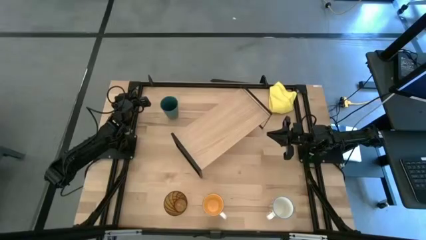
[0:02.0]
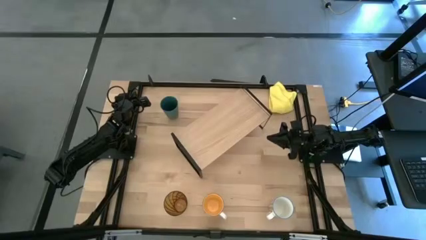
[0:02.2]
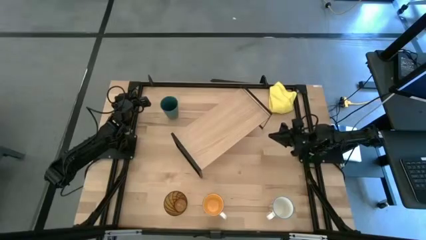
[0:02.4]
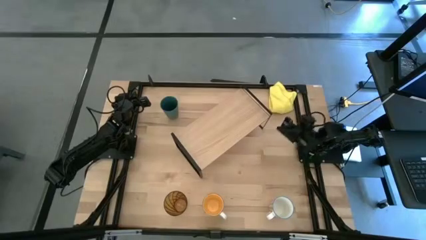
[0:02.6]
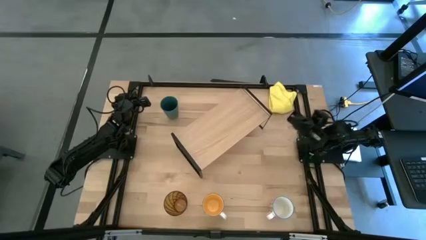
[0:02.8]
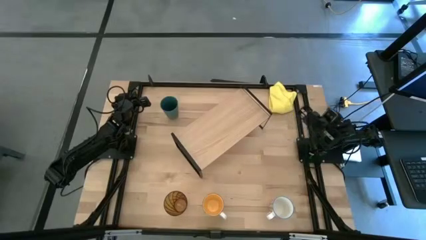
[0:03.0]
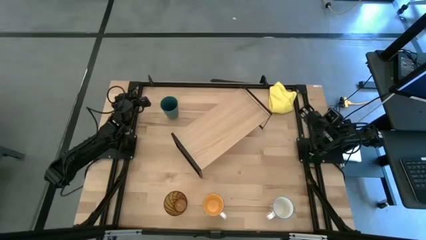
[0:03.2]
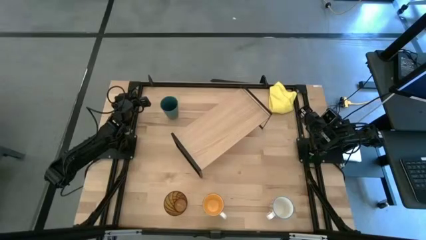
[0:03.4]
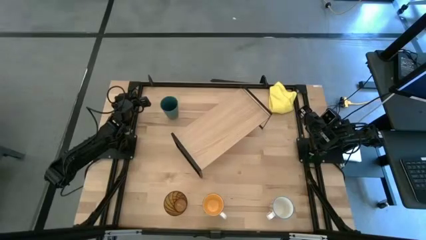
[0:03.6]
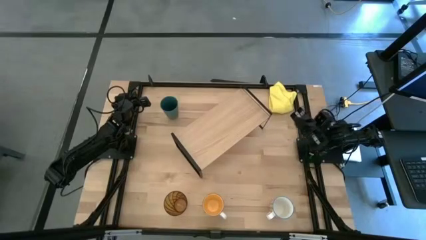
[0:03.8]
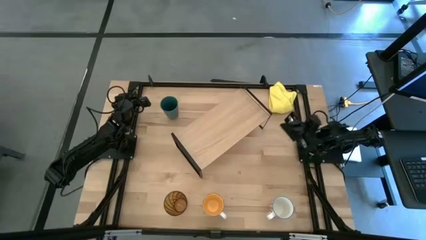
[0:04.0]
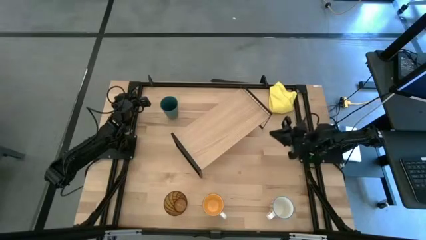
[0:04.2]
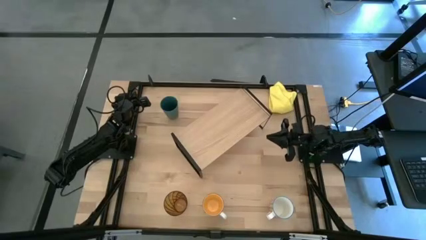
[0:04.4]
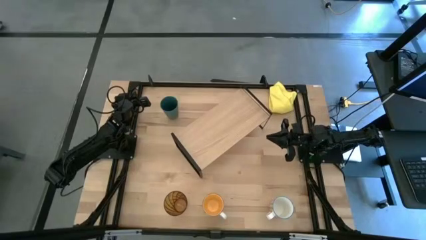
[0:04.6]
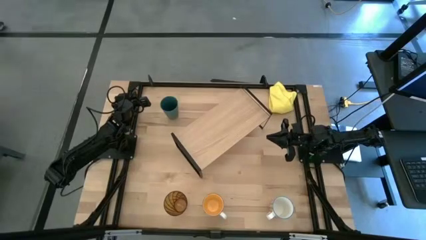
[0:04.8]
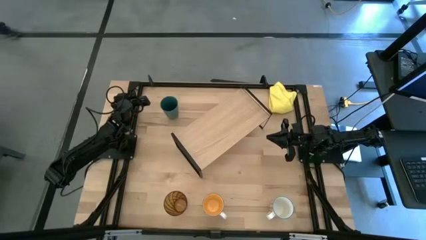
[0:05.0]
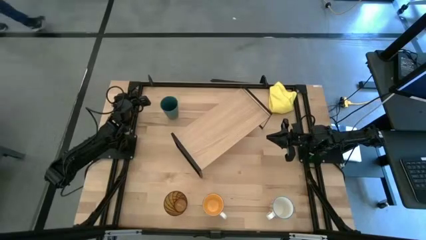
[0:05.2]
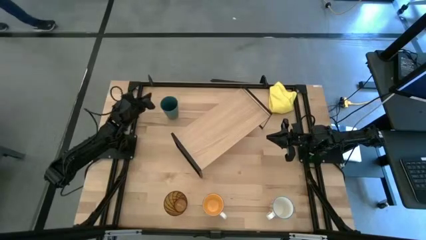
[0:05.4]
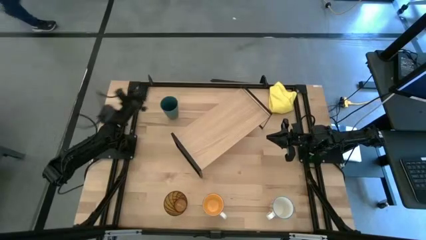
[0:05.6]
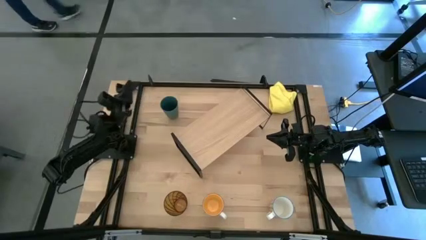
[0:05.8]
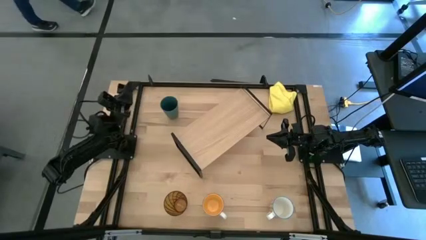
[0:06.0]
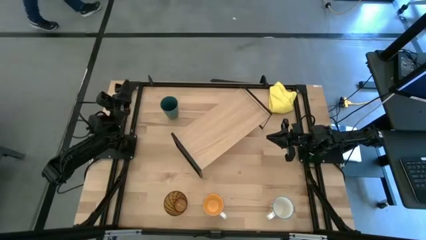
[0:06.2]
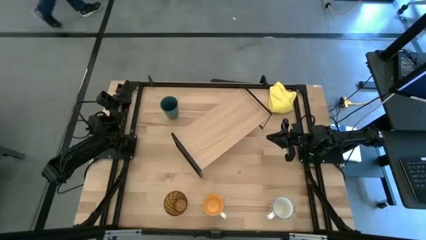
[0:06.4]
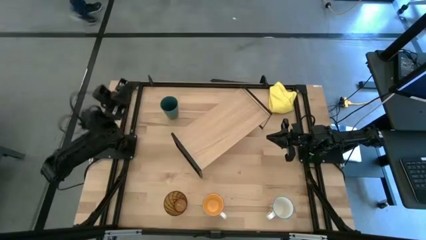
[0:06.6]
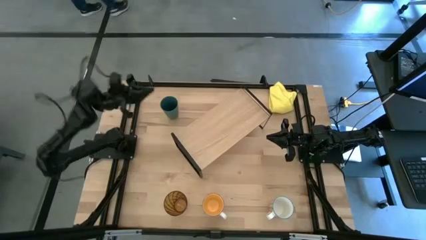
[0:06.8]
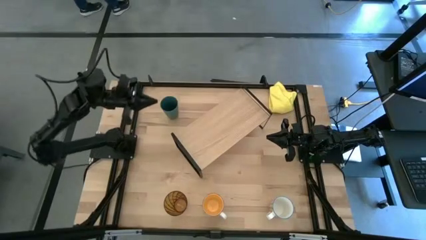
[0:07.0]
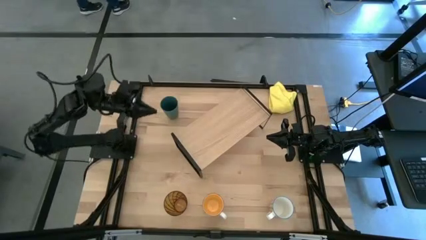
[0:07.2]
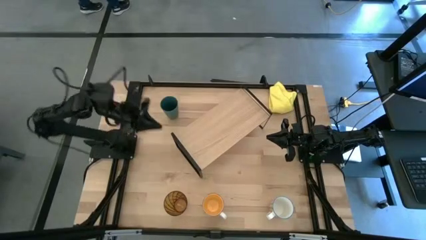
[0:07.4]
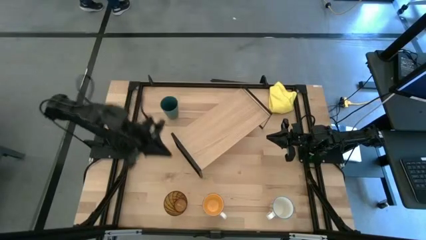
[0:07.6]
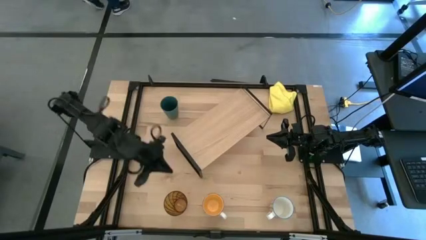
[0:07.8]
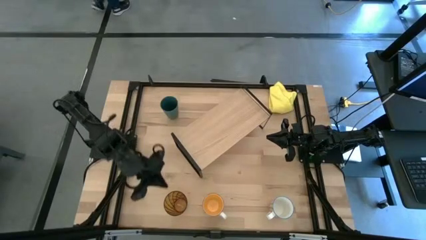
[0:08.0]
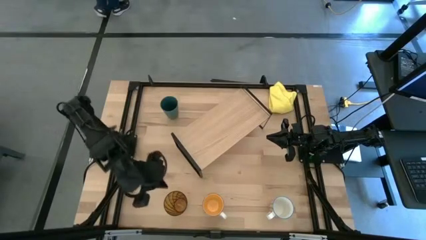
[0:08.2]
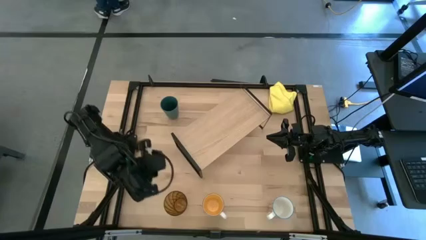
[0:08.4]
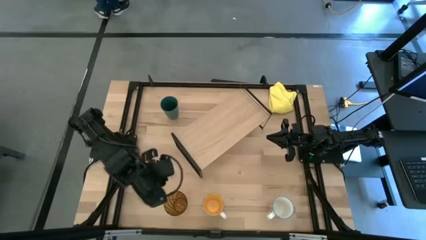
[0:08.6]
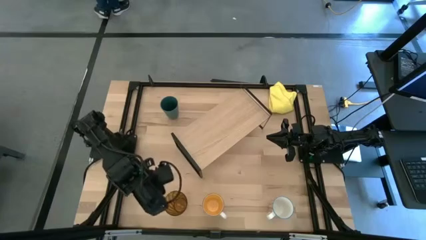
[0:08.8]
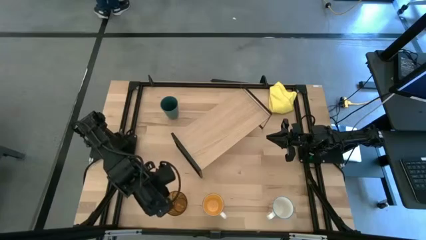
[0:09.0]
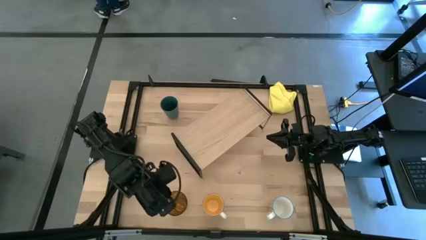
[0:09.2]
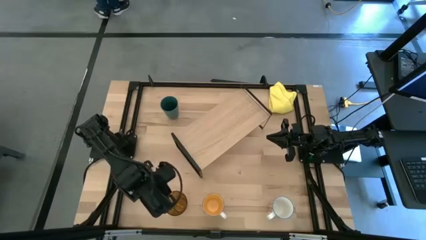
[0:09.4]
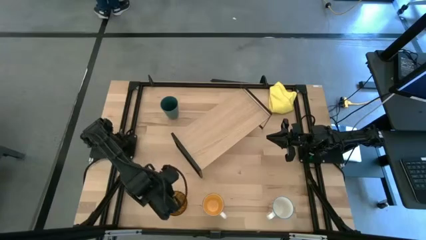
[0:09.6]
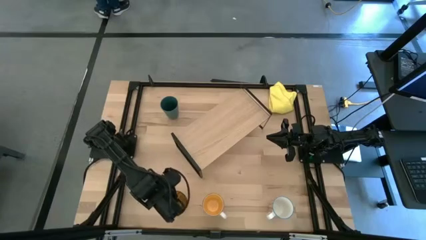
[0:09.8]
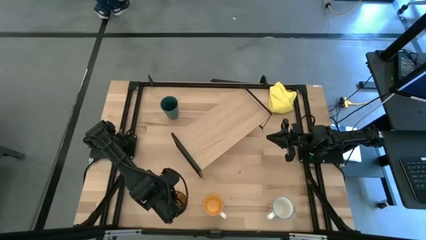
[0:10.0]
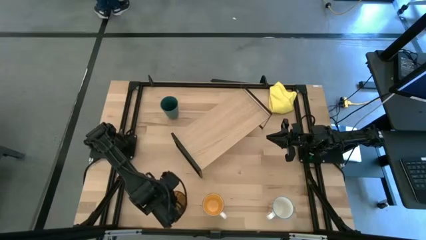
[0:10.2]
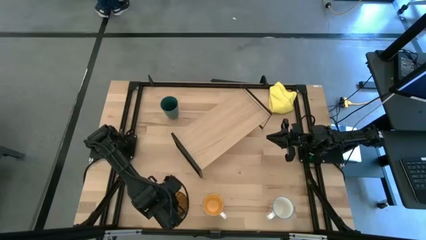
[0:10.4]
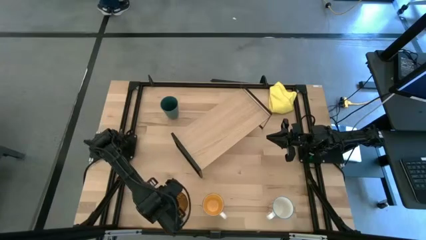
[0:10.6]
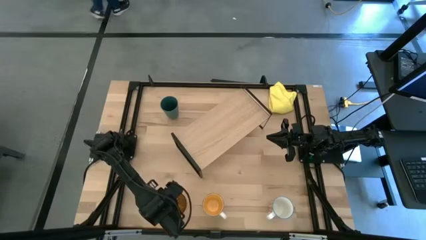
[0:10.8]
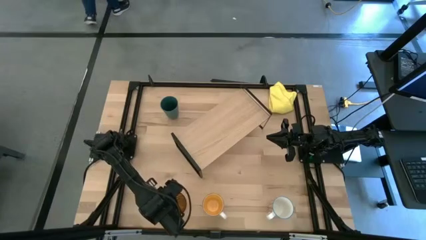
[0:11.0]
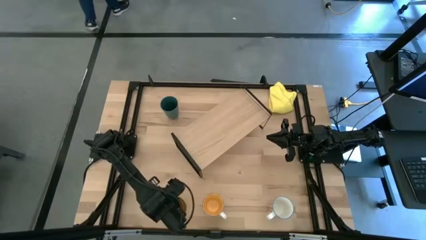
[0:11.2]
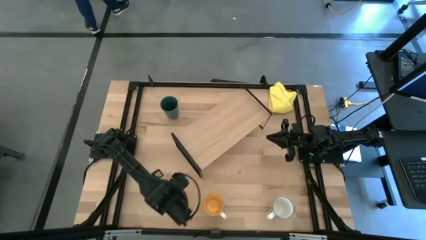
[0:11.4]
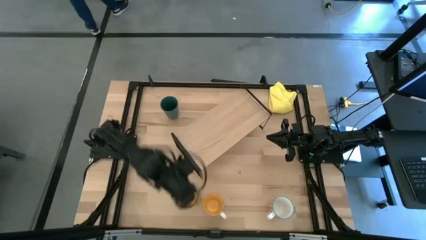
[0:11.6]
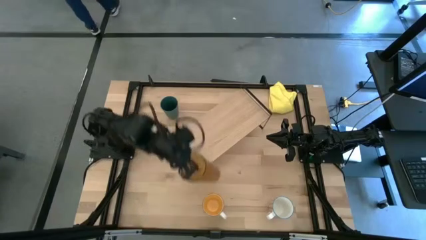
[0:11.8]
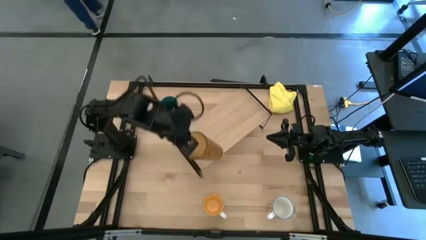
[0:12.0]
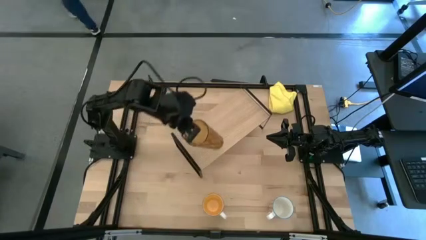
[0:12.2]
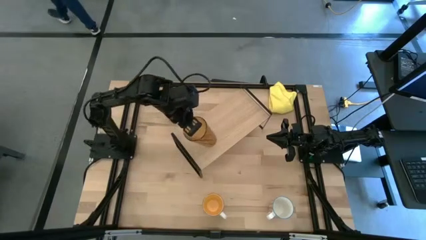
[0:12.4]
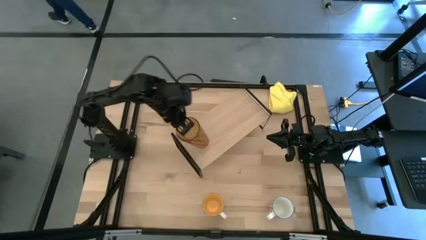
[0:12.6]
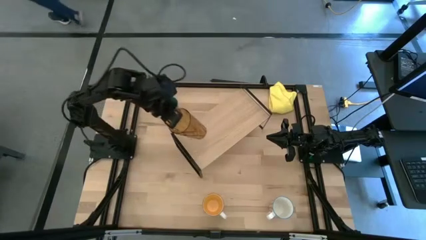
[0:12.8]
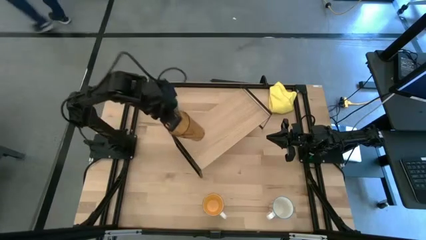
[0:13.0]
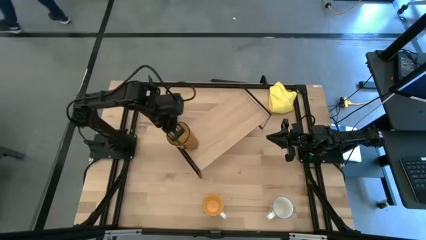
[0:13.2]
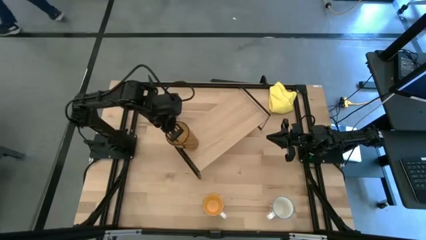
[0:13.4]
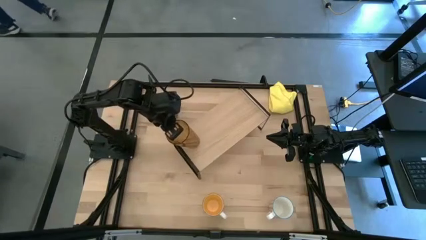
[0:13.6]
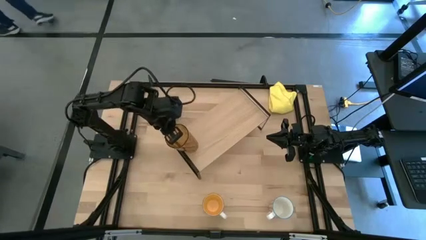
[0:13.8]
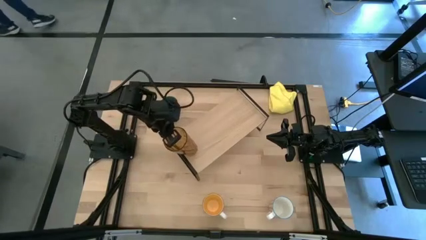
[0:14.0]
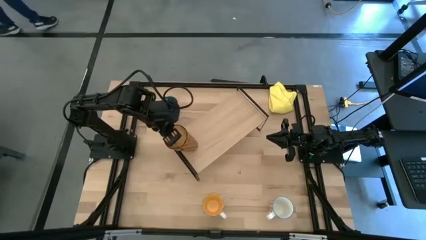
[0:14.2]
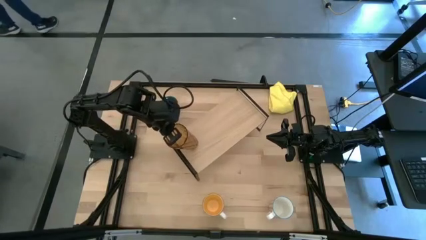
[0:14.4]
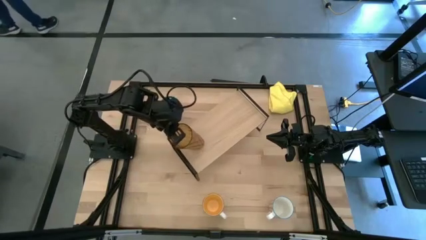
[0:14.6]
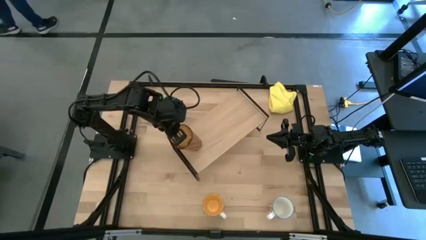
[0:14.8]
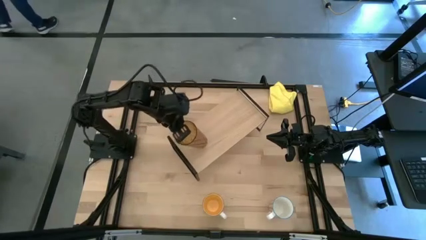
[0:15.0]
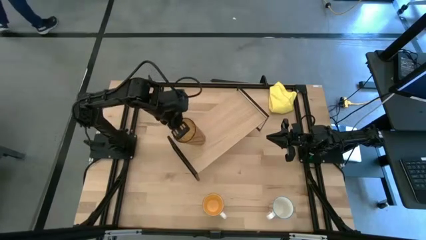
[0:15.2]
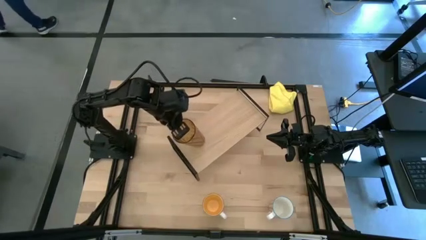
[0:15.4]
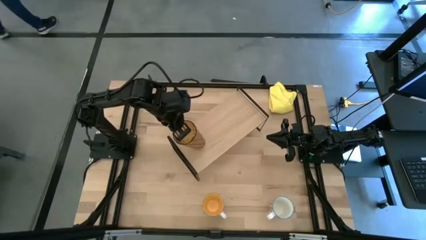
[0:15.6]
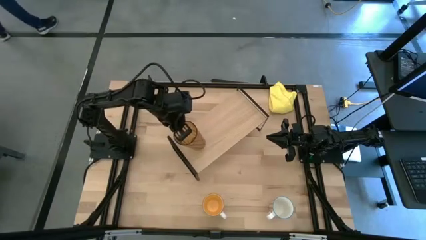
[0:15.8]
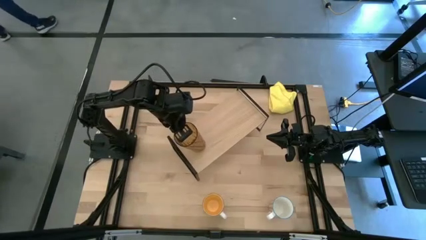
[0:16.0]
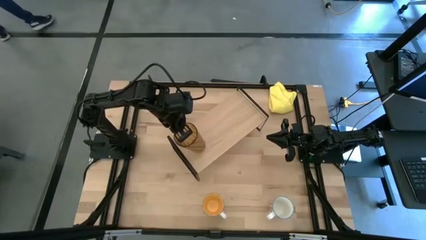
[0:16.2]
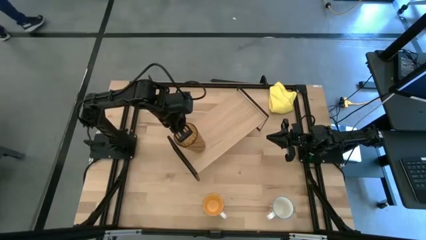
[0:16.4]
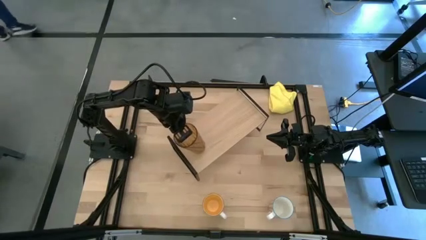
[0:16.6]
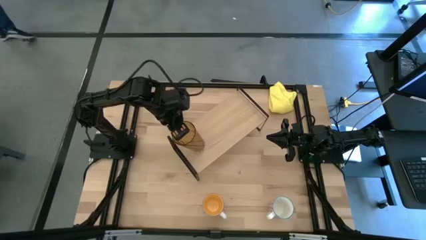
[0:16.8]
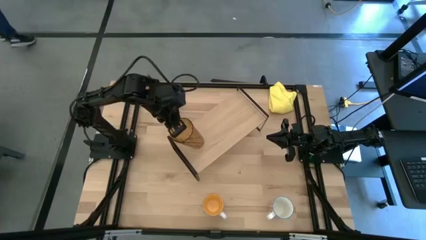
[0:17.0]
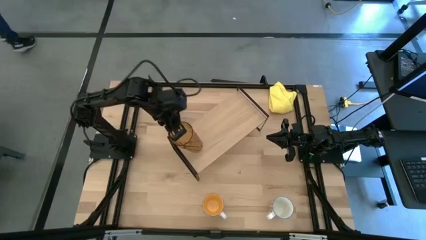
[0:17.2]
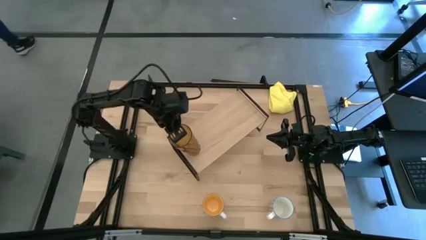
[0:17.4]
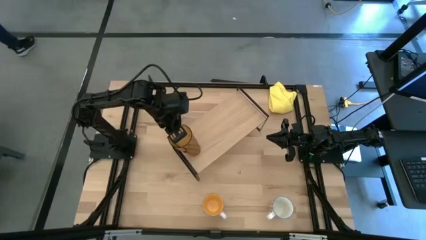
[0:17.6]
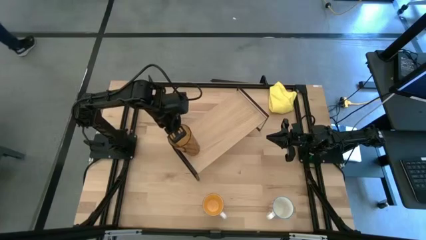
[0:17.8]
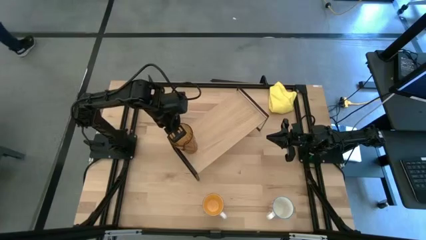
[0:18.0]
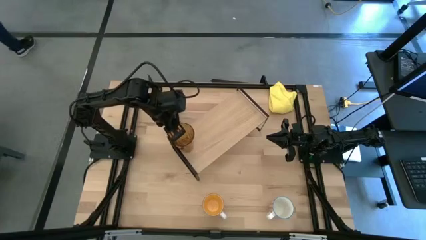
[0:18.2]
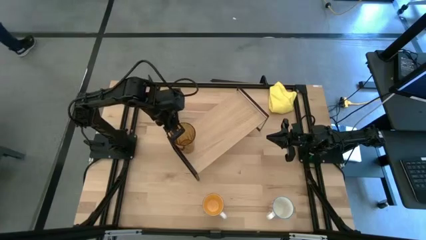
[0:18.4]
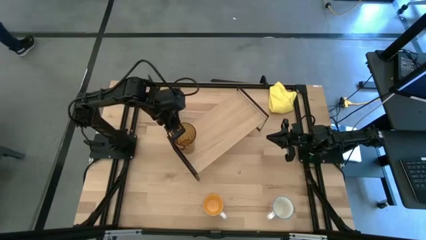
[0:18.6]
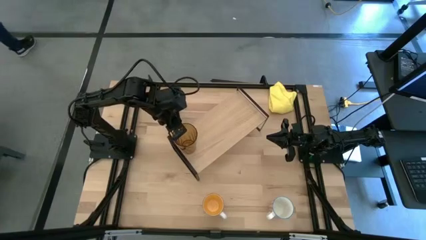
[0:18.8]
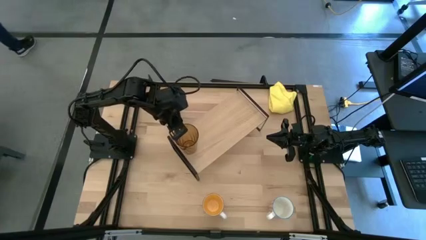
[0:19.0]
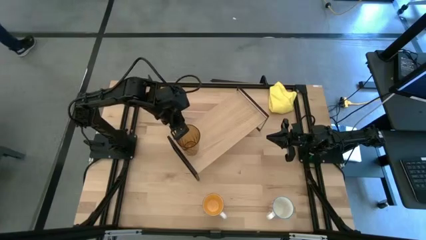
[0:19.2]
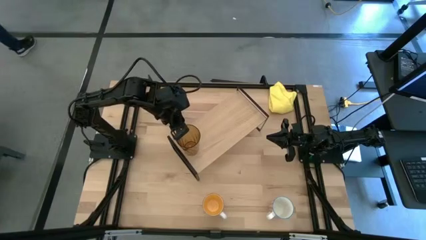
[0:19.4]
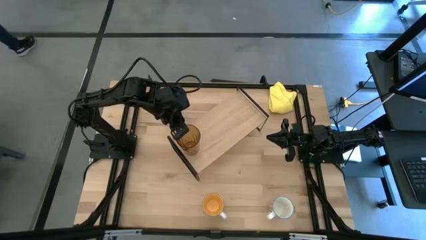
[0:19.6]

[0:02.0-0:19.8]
Task: Stack small to large cups/mugs on shelf
Put the brown cup on the shelf
